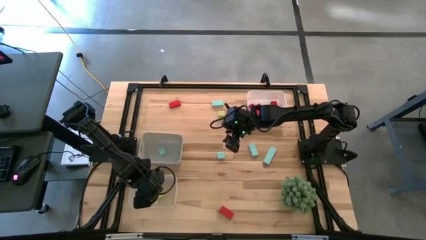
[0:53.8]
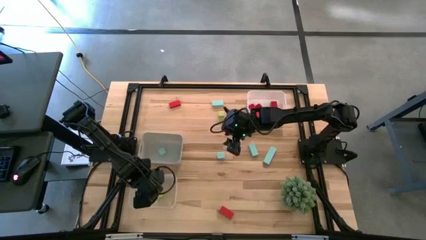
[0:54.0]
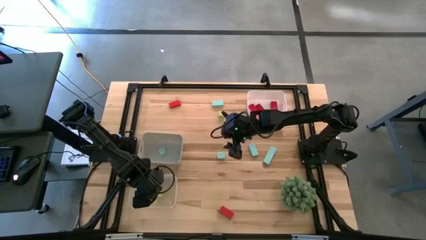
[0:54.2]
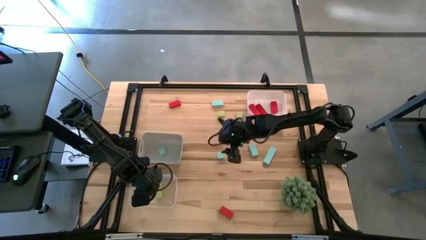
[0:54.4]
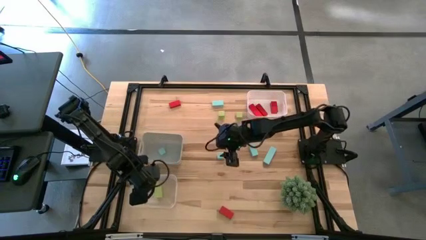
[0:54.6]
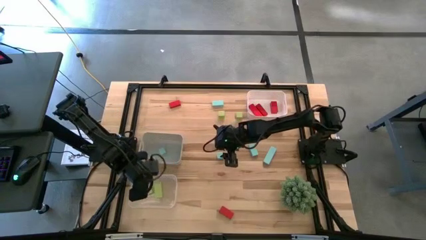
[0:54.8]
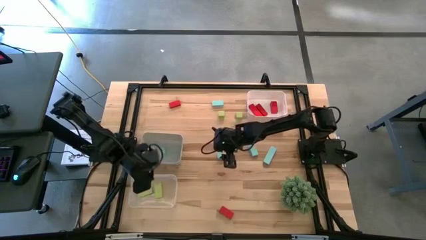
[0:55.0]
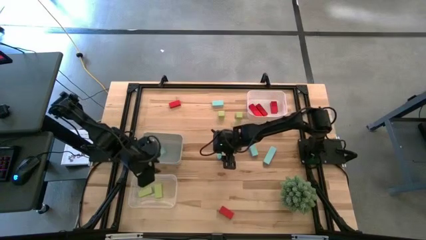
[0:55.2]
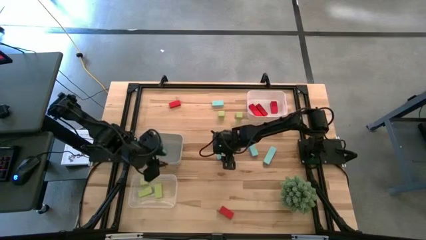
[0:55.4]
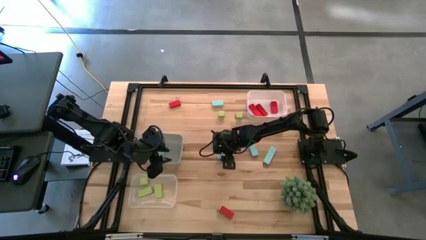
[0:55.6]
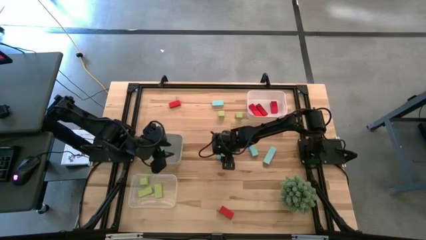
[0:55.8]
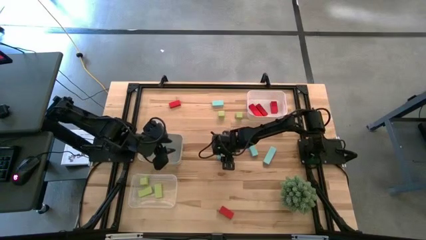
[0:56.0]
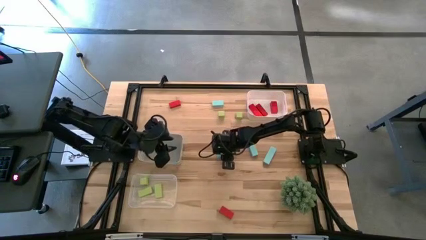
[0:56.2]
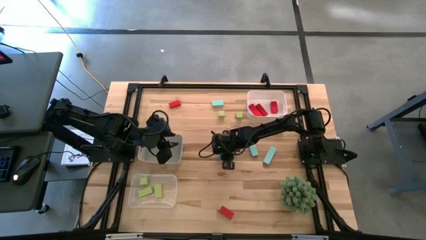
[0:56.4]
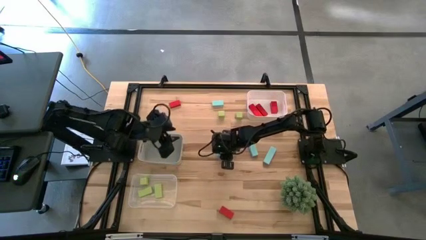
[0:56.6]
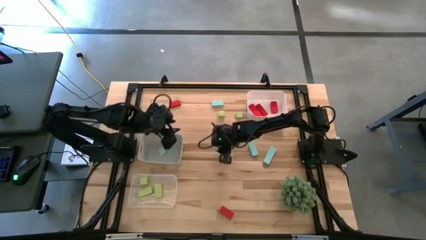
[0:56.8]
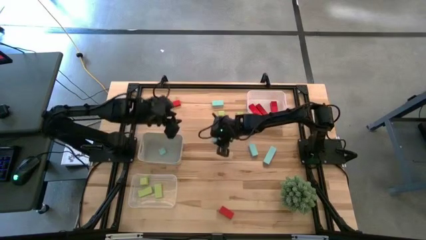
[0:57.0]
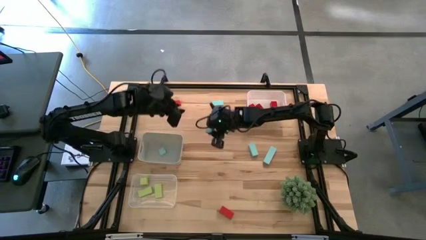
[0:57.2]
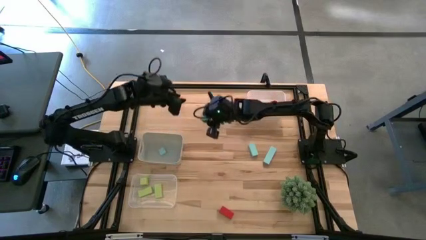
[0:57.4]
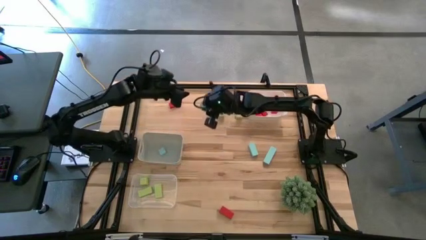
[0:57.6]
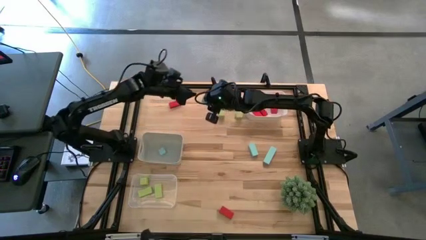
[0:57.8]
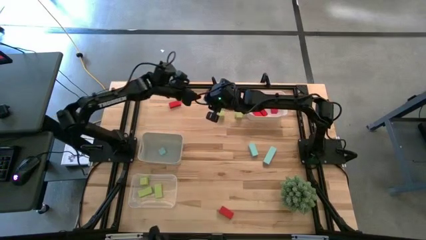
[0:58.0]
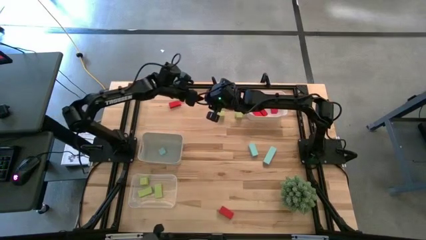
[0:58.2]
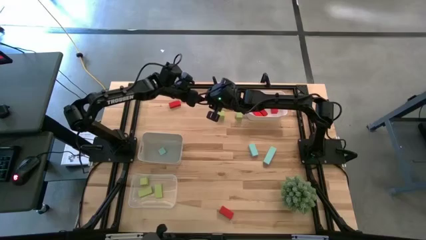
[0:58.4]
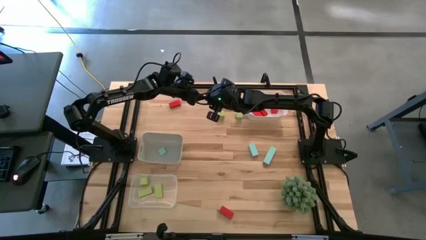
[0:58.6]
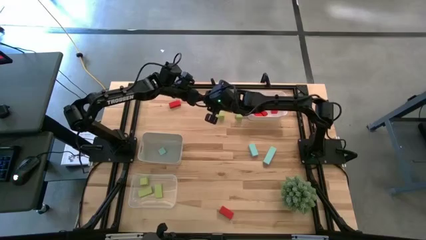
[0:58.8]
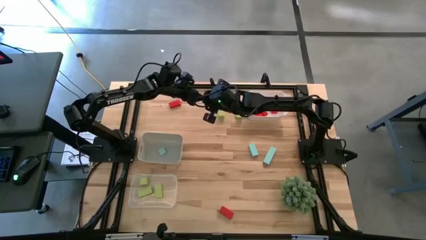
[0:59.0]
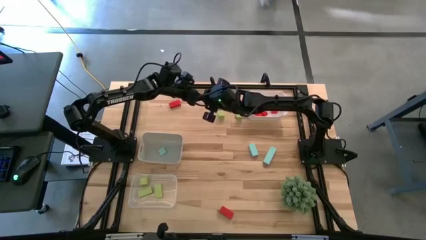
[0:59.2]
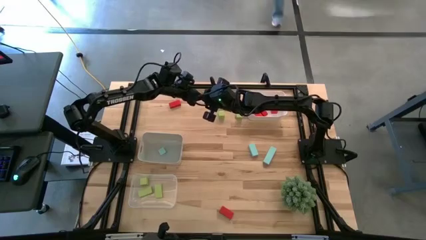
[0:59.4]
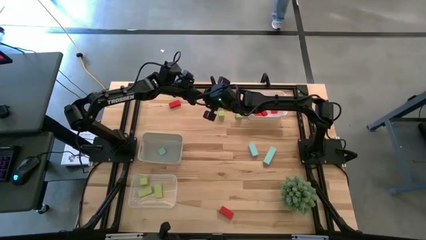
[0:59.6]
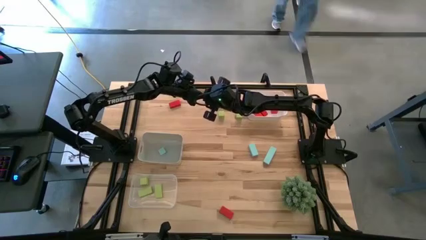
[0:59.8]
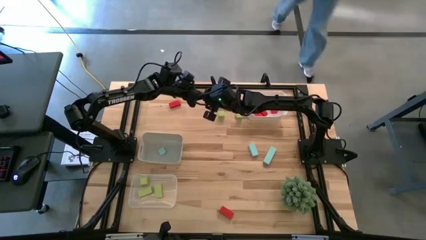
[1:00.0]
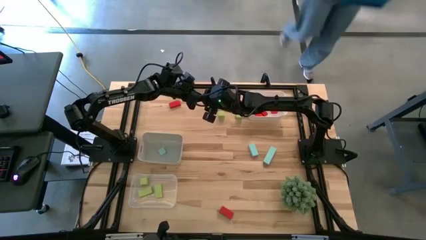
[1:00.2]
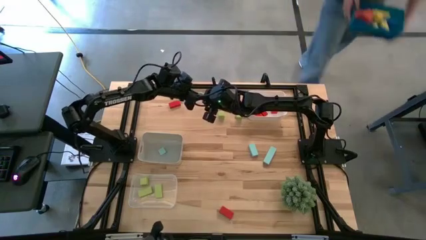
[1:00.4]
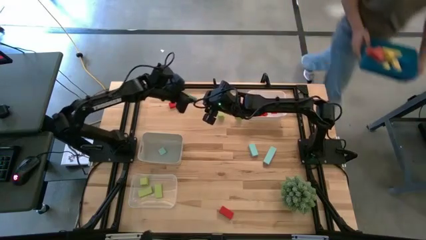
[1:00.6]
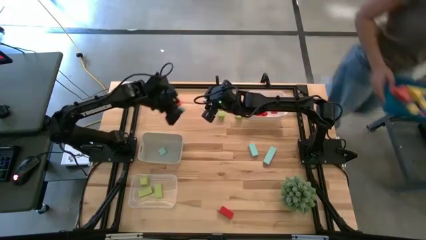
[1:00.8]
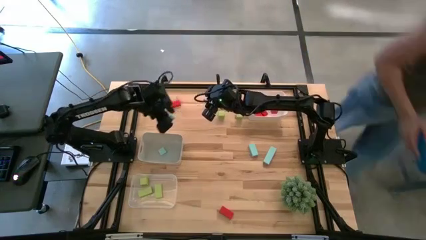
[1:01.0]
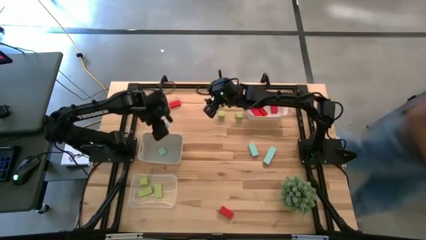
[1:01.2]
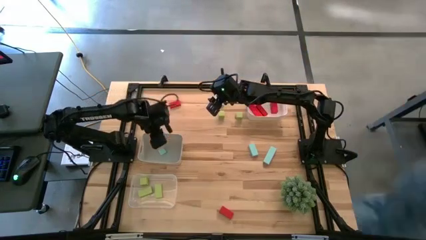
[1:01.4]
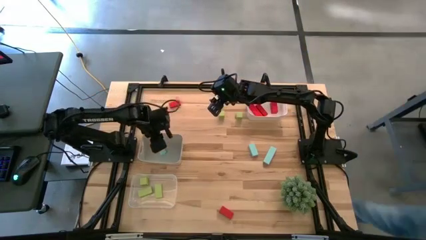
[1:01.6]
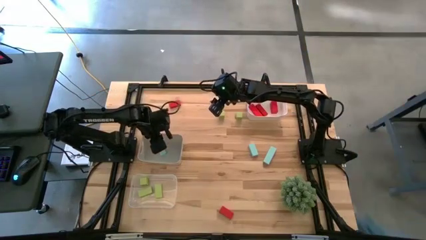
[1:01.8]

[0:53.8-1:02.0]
Task: Sort & place blocks by color
Put the blue block into the gray bin

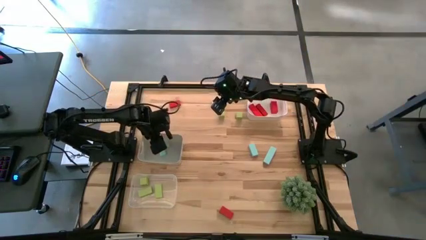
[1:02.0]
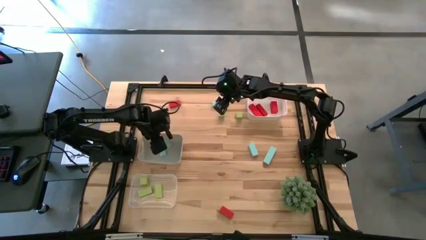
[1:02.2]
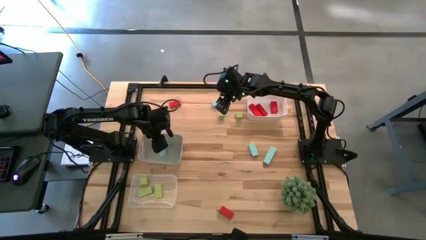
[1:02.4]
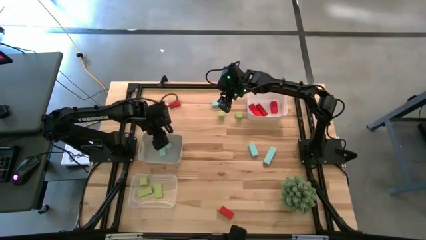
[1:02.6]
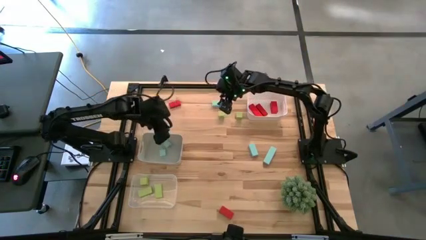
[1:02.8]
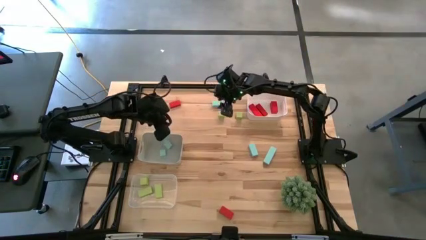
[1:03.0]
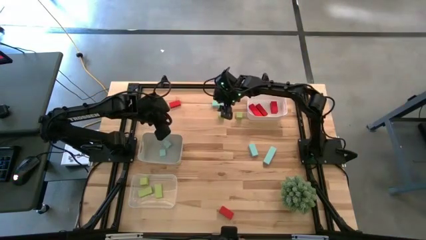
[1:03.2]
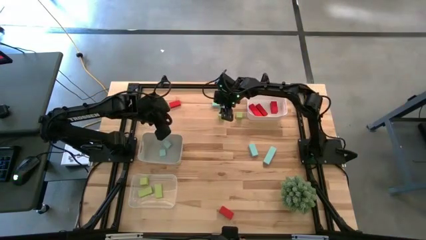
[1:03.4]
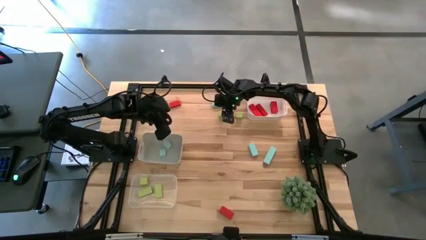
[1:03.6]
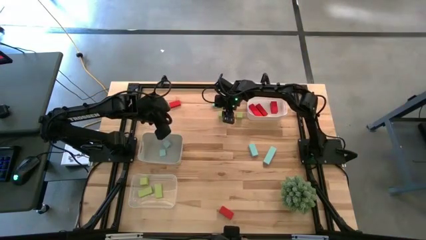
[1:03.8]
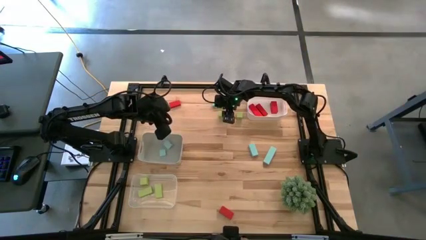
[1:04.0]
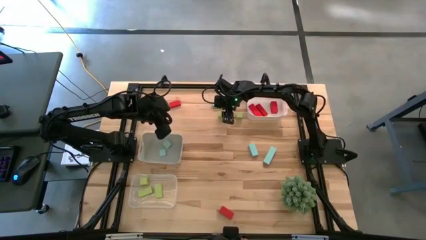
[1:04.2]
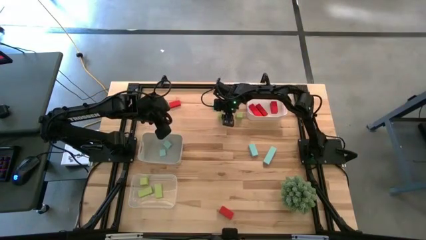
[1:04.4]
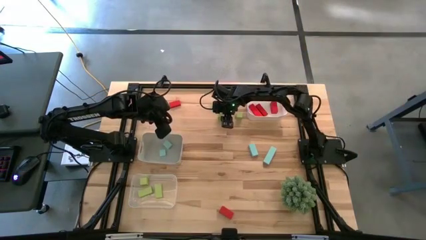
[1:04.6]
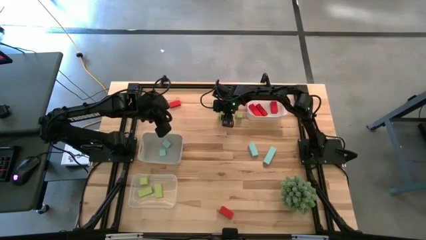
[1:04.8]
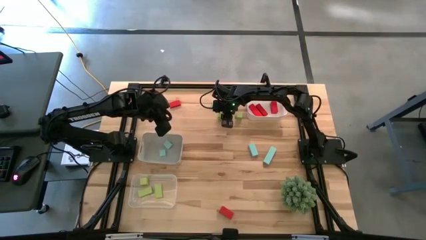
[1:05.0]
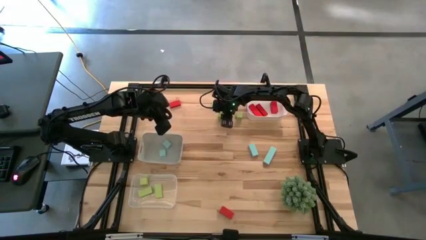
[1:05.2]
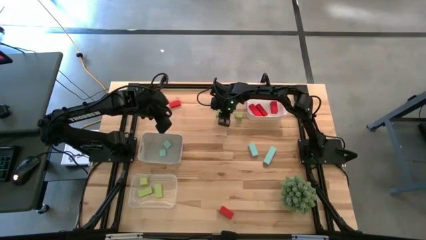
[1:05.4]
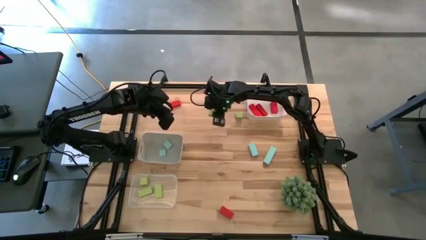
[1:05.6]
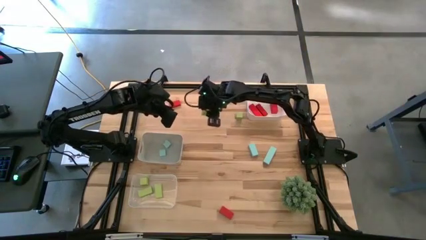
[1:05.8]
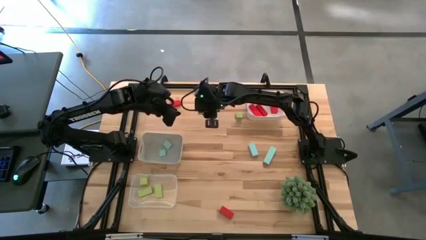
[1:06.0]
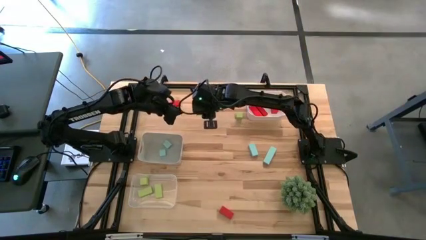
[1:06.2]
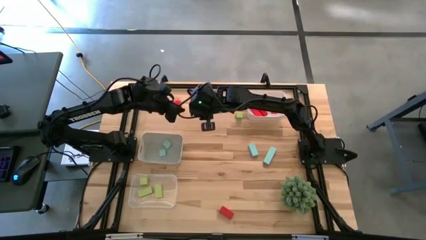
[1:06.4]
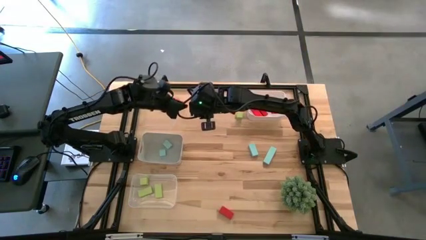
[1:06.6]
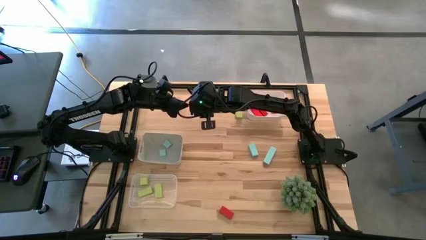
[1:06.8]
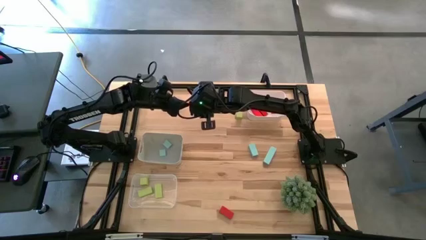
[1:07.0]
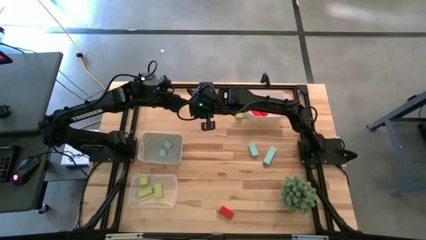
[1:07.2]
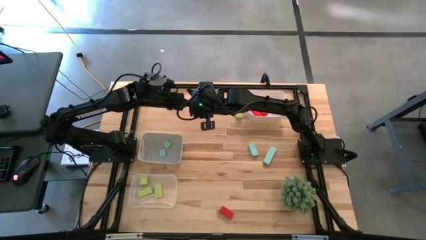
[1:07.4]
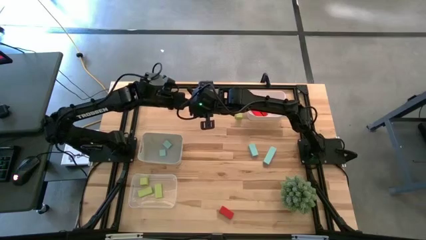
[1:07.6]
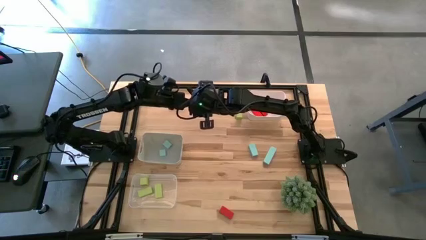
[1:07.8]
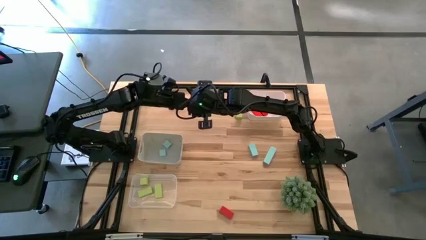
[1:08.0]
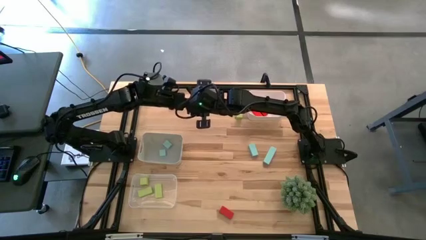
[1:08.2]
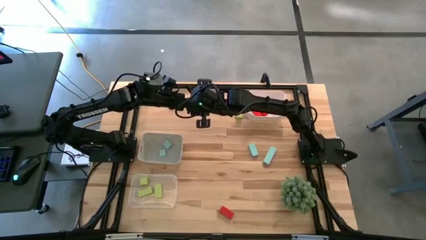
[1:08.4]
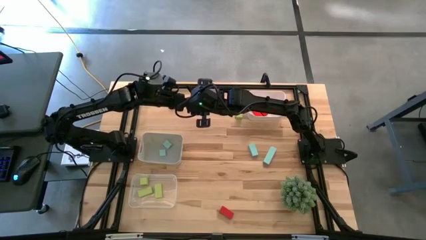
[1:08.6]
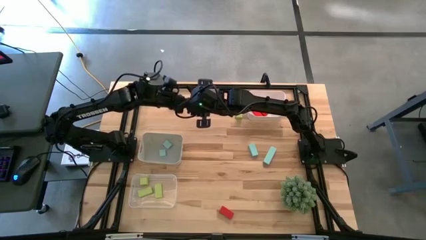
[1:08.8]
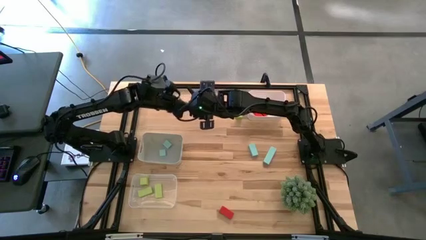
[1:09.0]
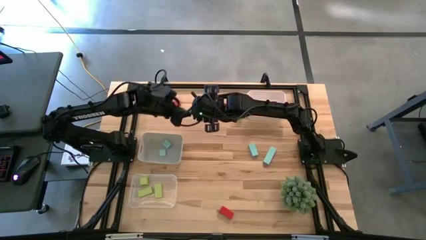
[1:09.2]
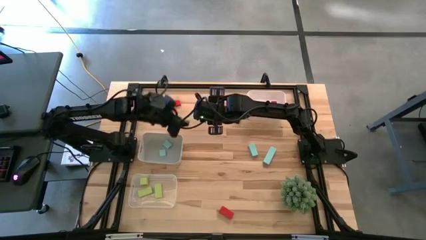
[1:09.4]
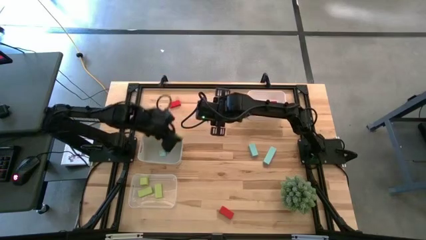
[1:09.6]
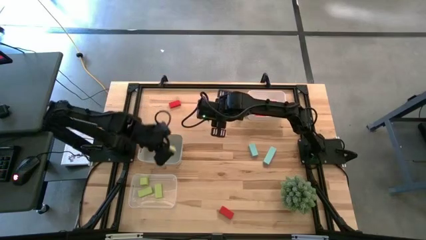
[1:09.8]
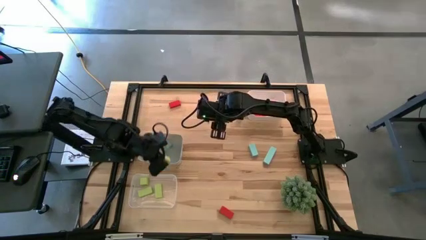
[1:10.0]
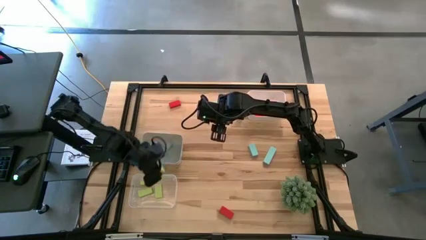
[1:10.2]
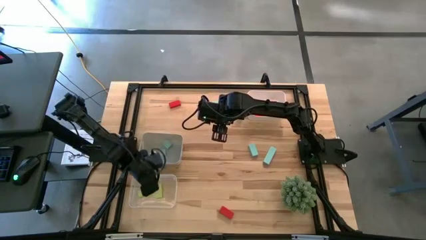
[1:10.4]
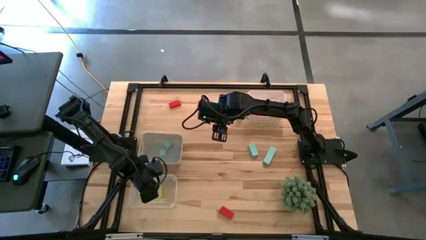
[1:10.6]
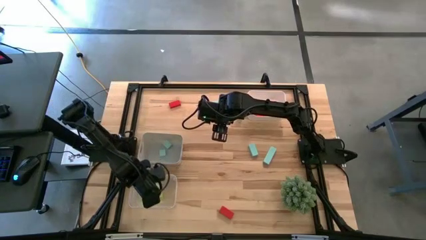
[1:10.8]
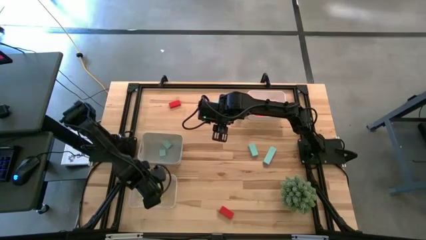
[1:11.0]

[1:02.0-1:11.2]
Put the green block into the transparent bin
